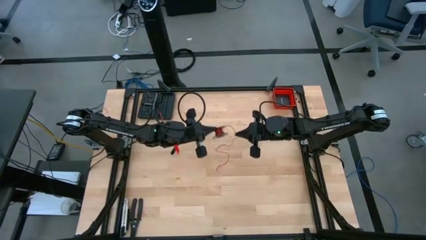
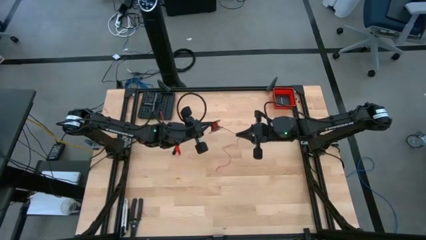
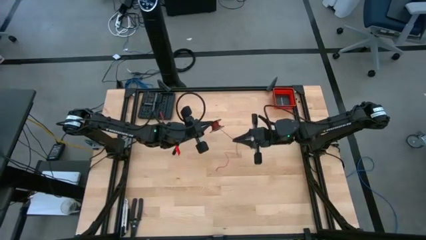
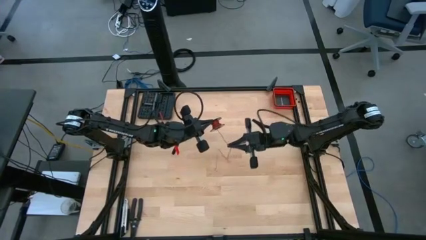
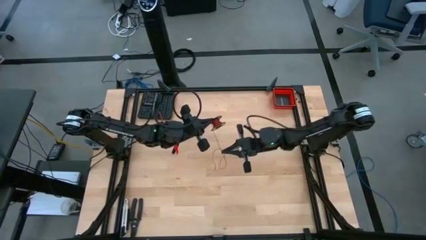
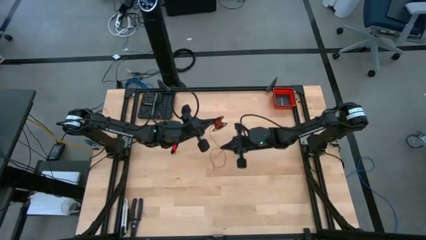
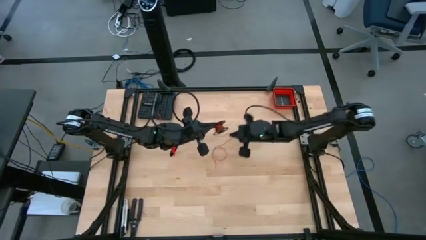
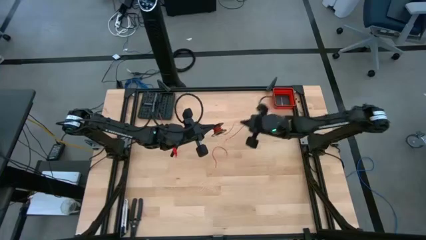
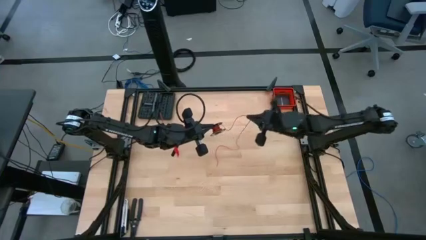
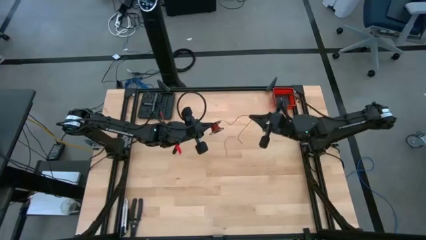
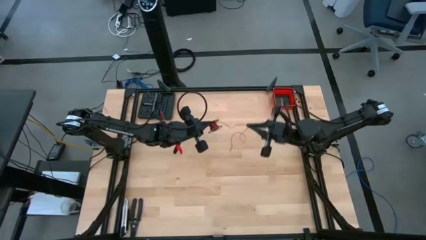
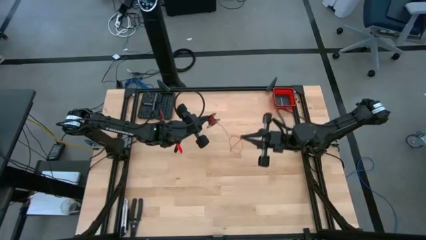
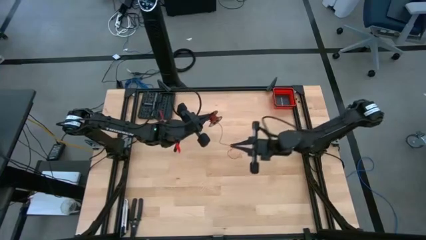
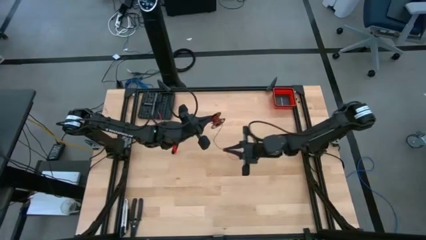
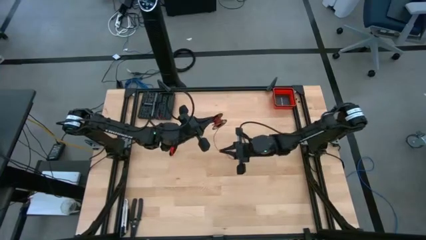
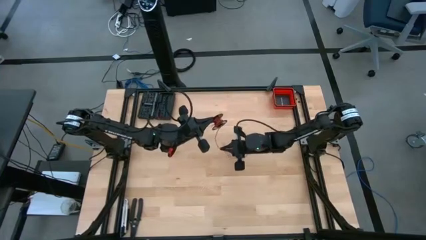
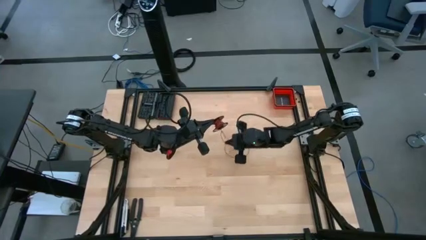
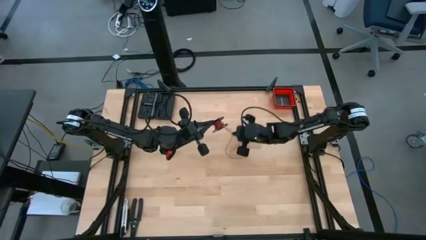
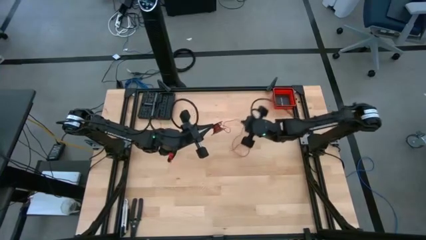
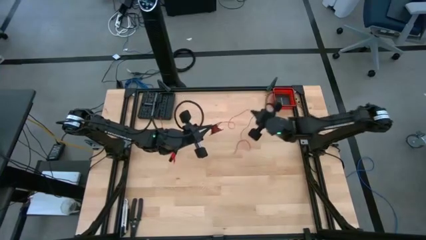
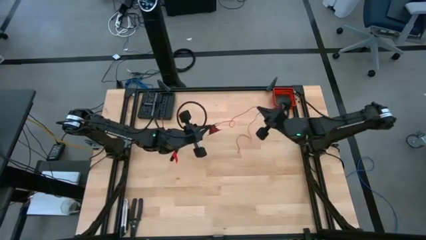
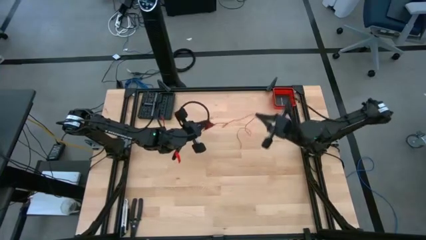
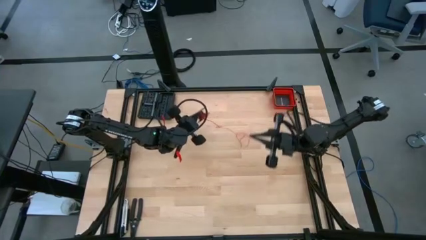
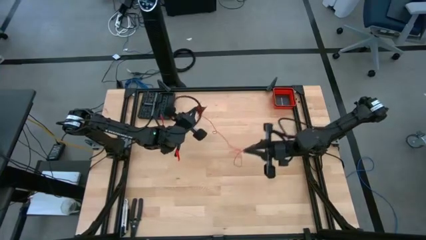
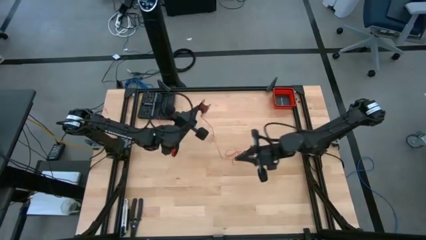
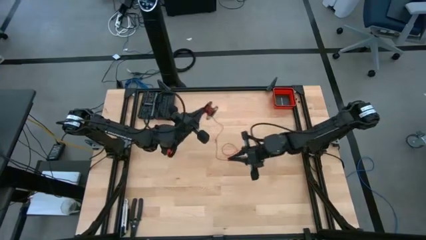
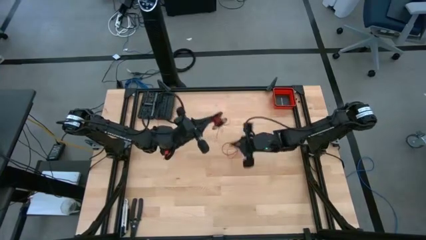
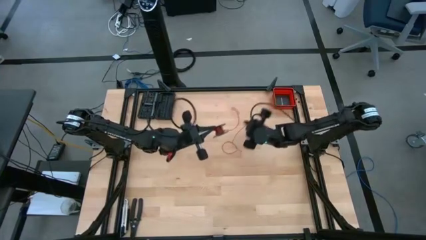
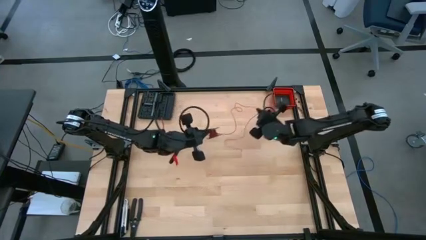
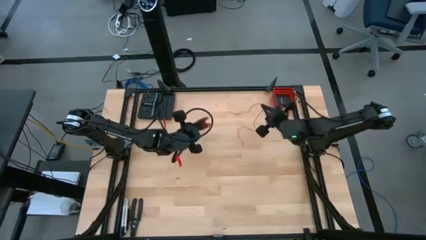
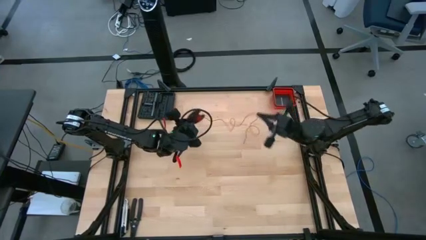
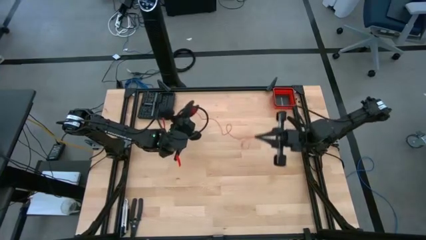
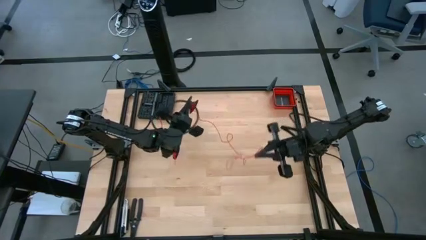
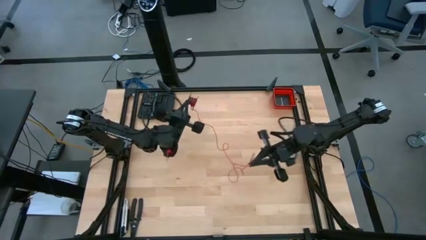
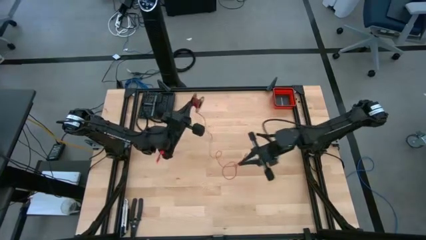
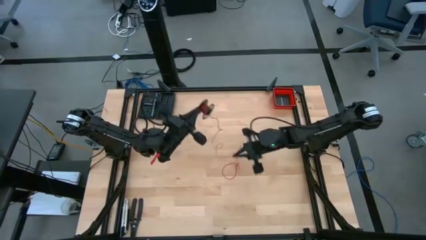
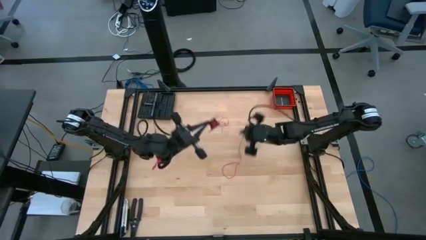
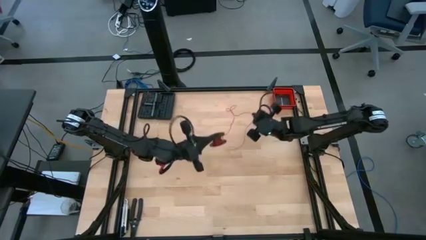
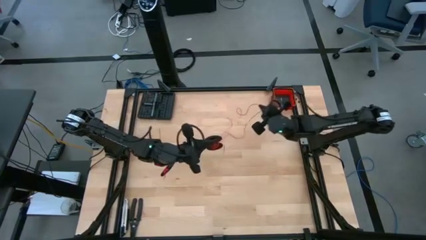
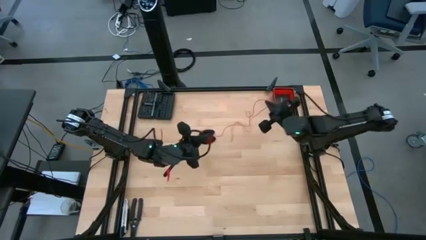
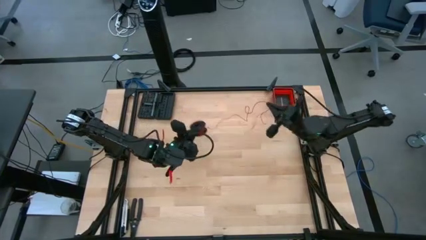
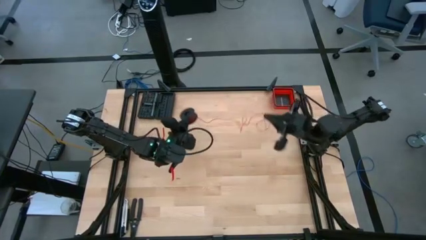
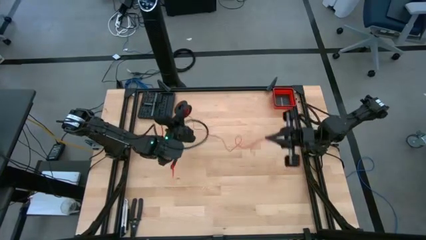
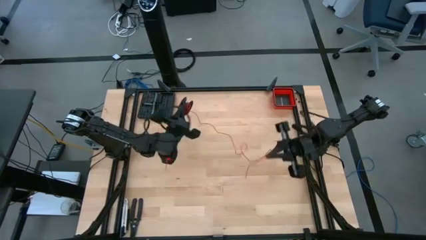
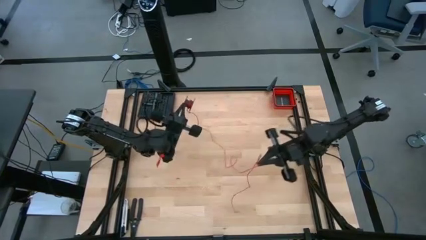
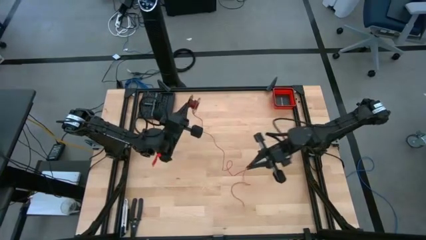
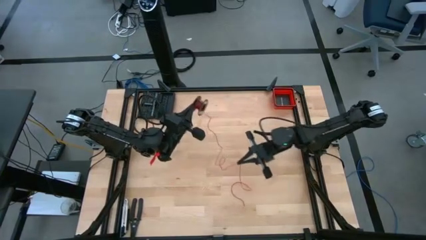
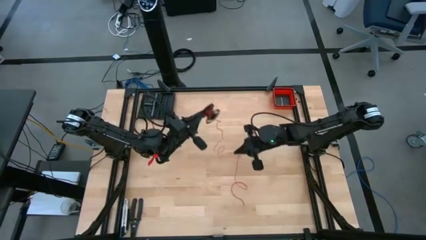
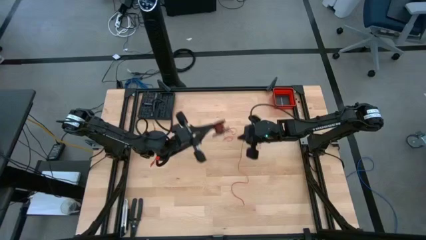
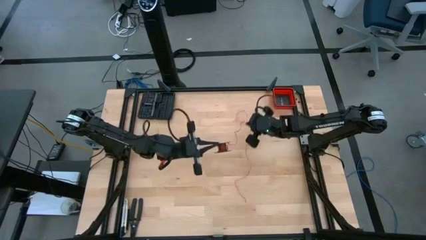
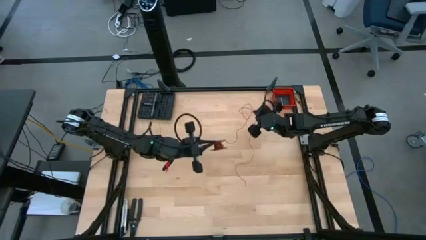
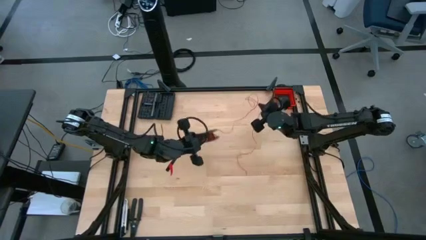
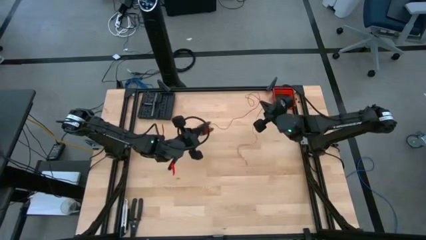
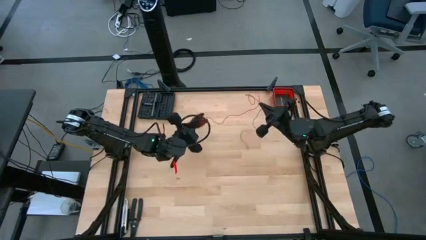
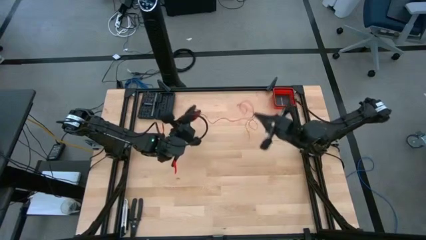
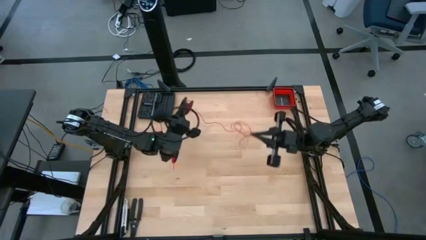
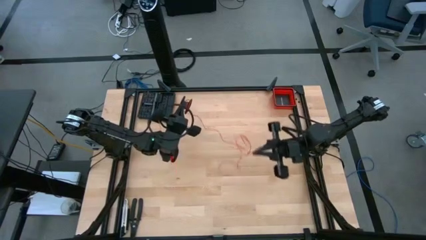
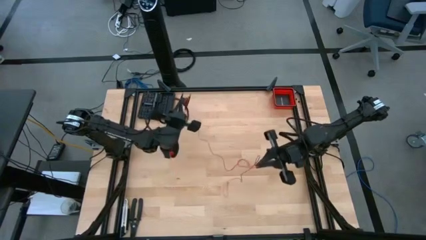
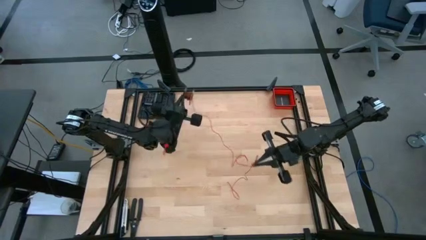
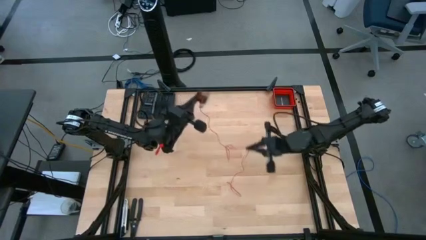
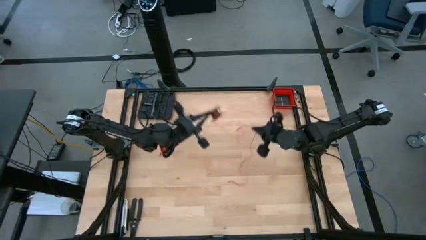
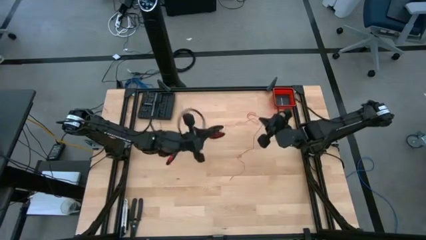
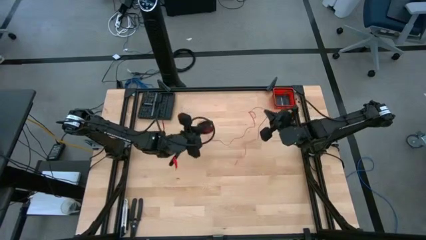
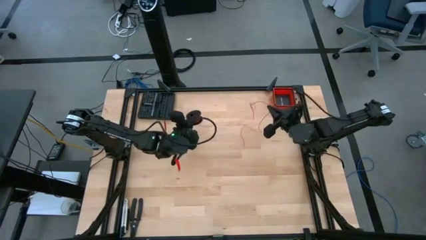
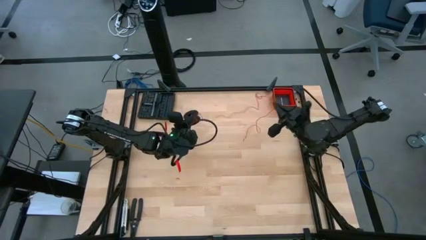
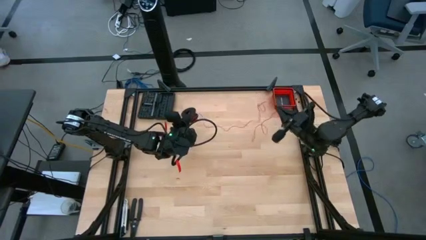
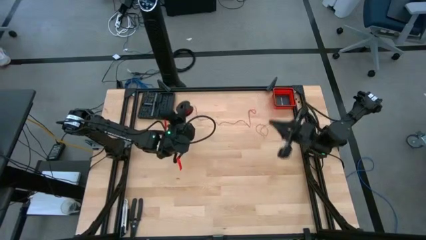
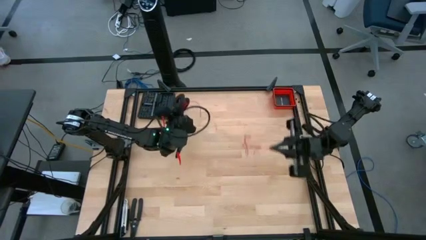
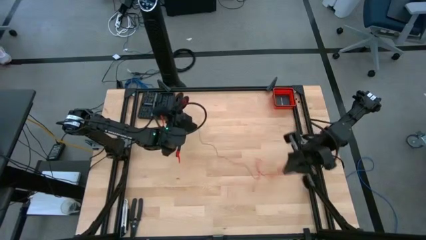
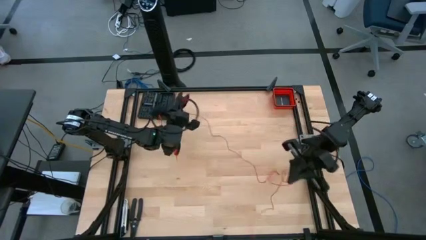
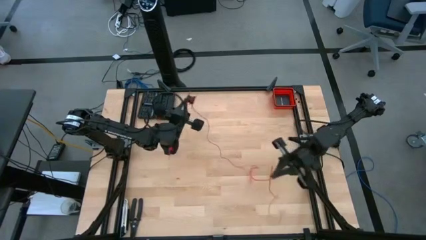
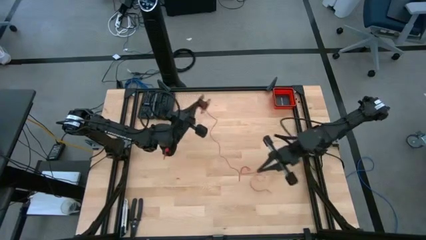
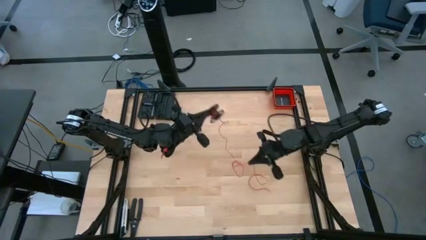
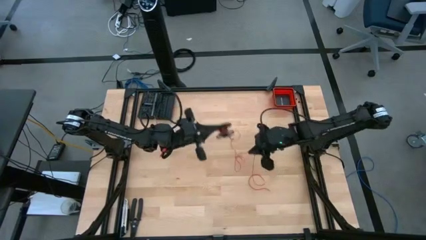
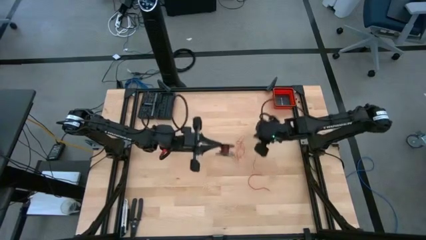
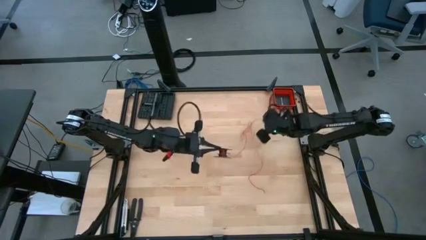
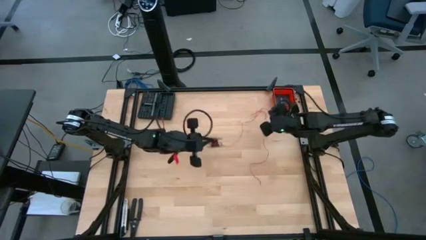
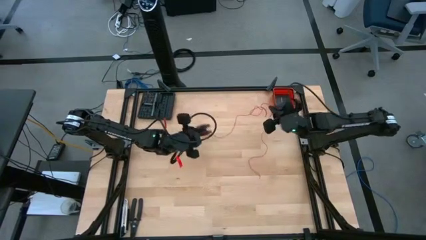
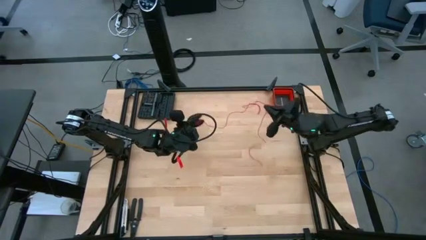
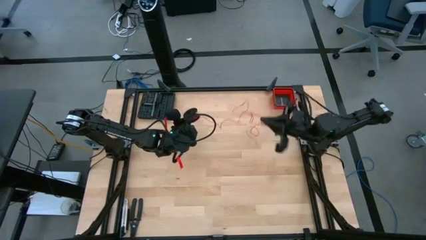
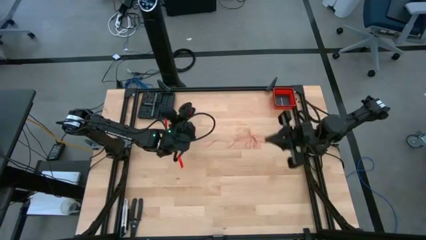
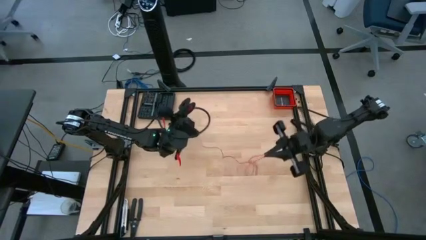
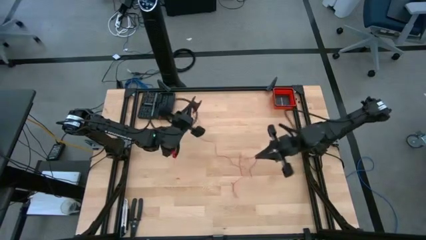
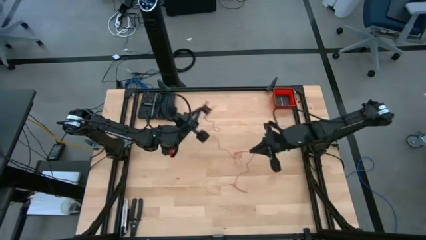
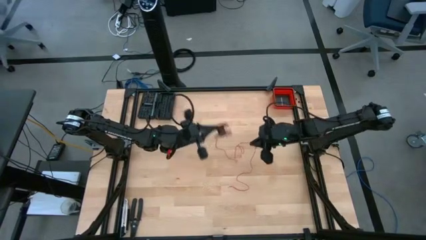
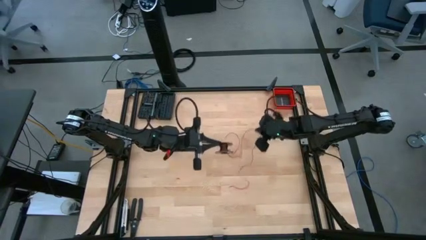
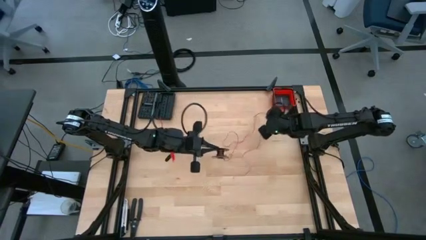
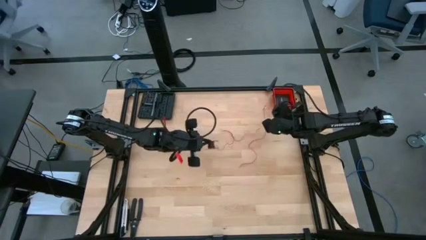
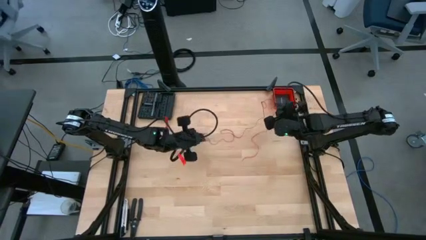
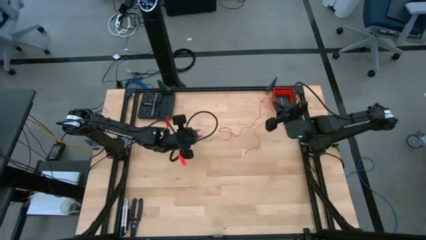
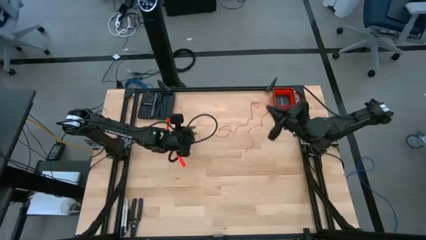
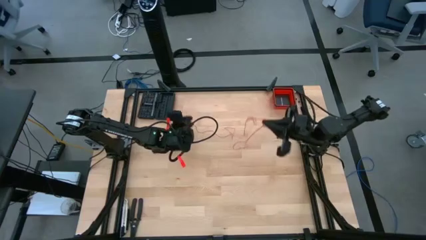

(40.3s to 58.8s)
Task: Coil cords
Uncoil the red wire from the black spool
